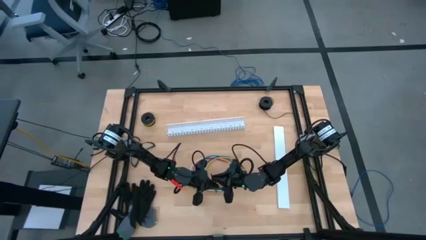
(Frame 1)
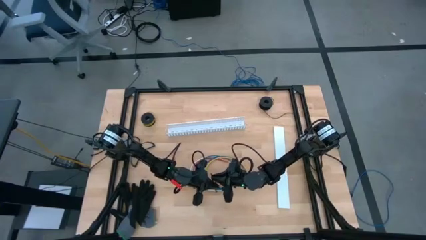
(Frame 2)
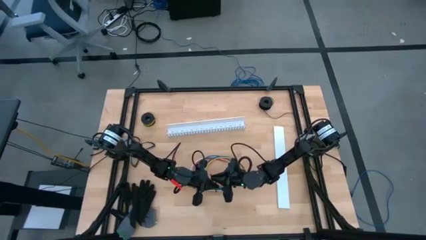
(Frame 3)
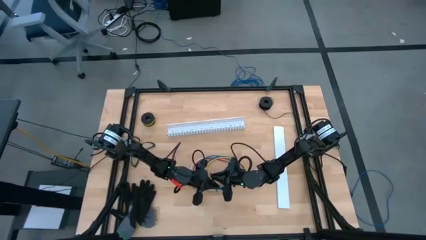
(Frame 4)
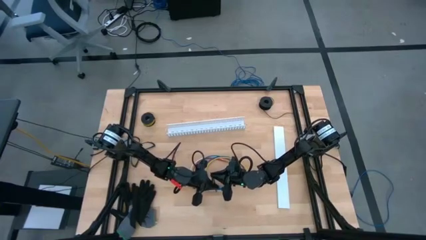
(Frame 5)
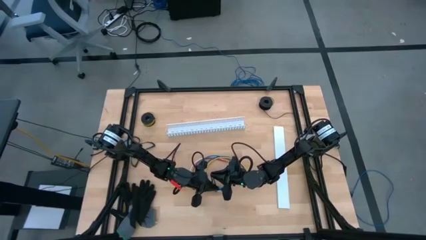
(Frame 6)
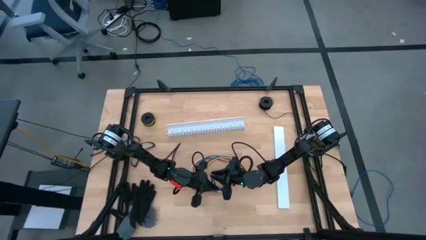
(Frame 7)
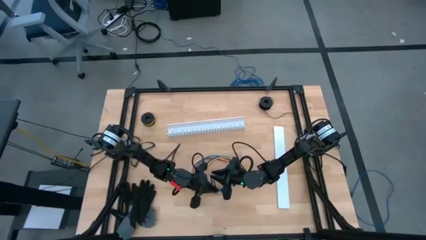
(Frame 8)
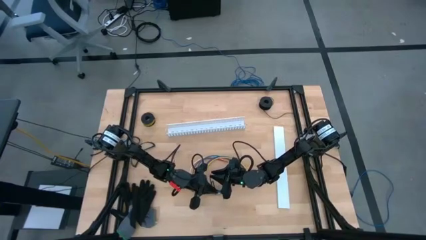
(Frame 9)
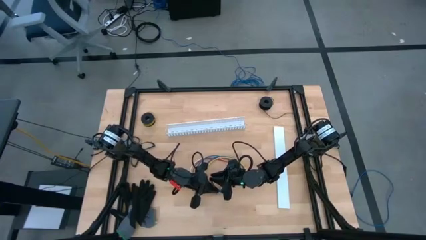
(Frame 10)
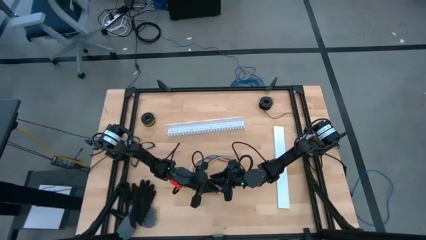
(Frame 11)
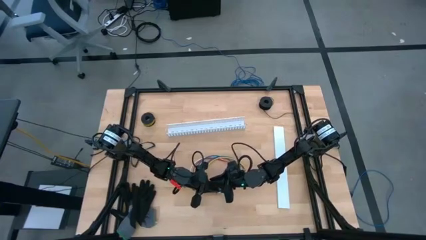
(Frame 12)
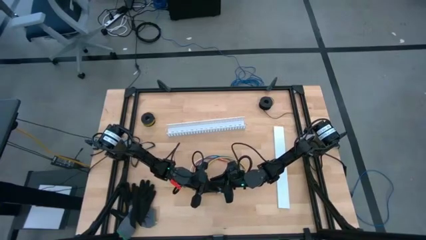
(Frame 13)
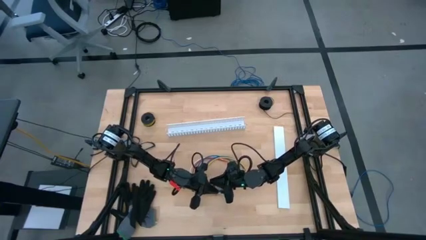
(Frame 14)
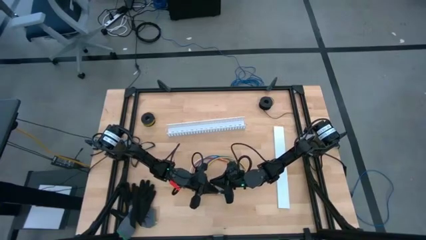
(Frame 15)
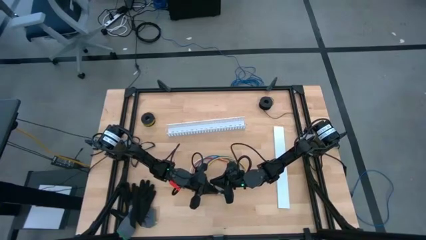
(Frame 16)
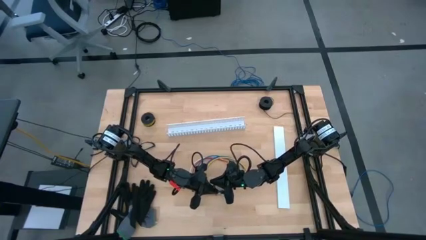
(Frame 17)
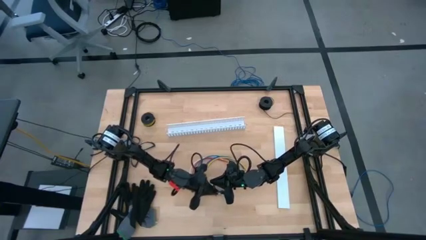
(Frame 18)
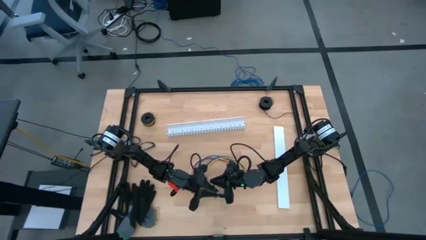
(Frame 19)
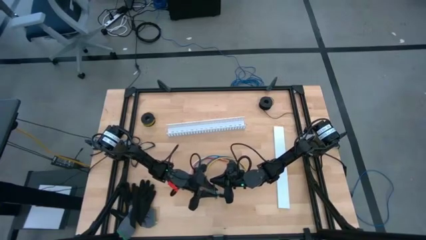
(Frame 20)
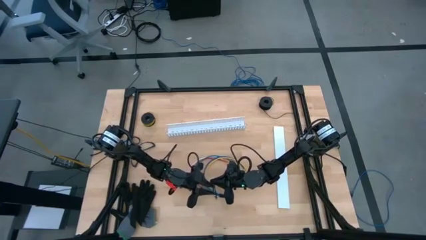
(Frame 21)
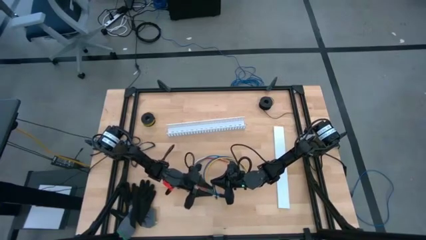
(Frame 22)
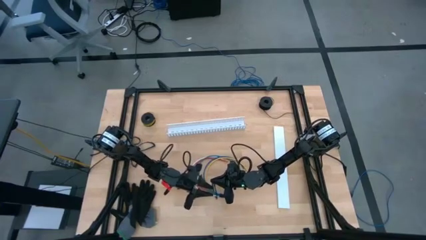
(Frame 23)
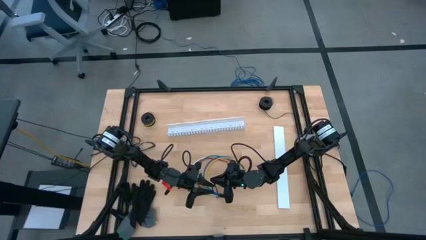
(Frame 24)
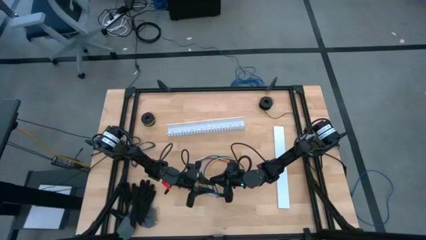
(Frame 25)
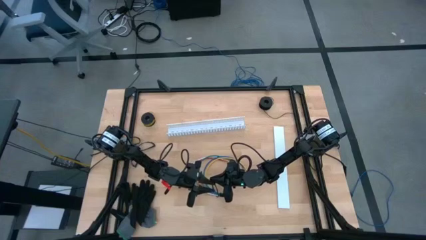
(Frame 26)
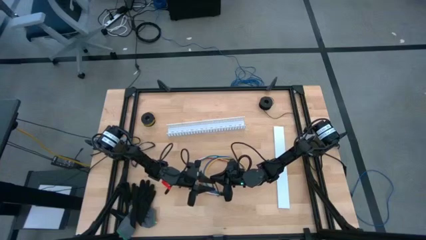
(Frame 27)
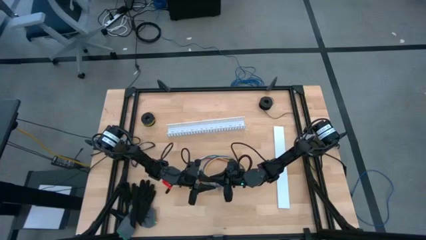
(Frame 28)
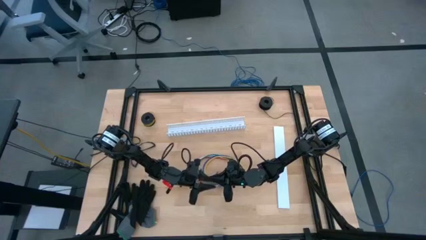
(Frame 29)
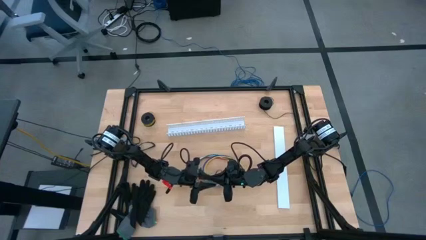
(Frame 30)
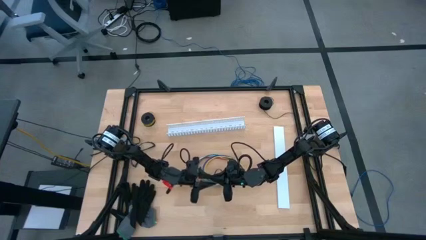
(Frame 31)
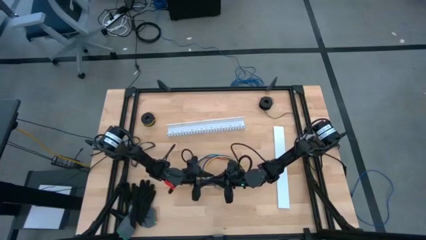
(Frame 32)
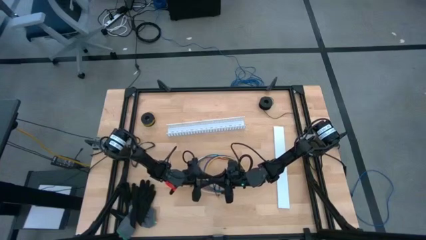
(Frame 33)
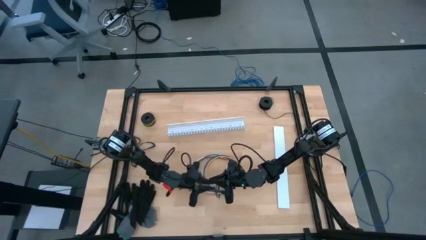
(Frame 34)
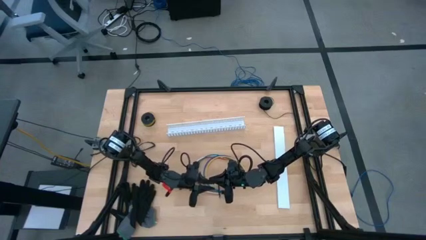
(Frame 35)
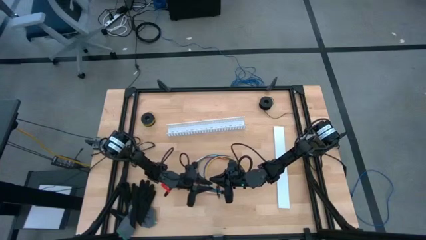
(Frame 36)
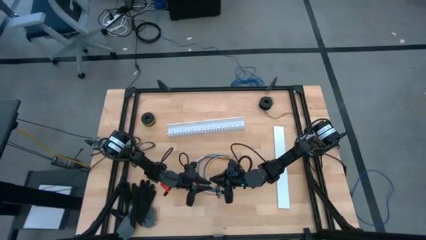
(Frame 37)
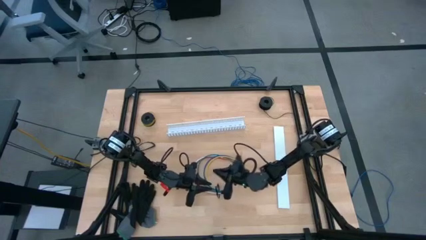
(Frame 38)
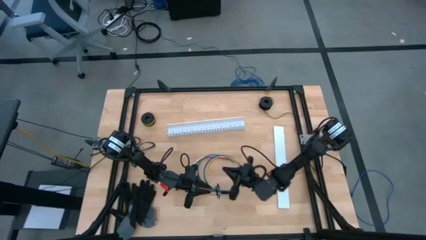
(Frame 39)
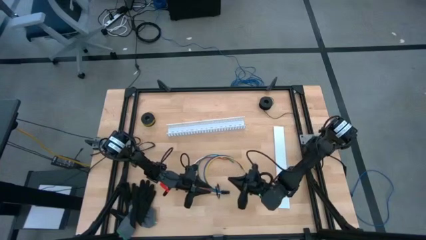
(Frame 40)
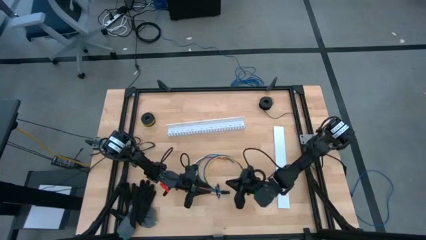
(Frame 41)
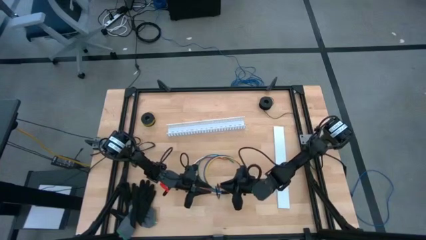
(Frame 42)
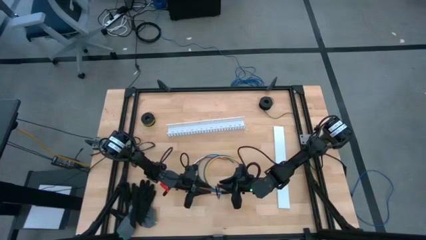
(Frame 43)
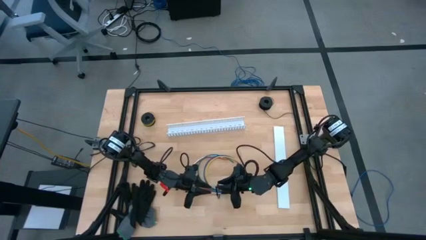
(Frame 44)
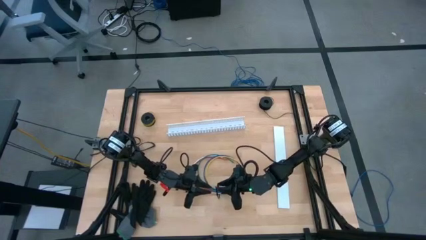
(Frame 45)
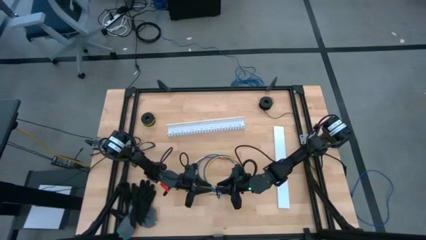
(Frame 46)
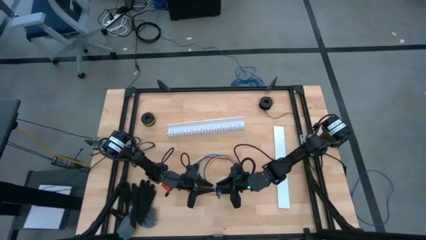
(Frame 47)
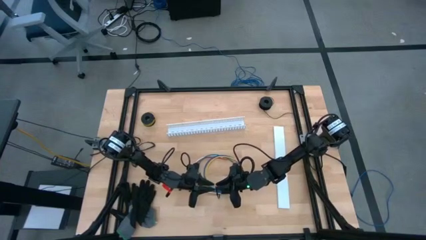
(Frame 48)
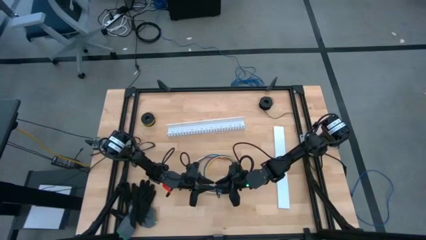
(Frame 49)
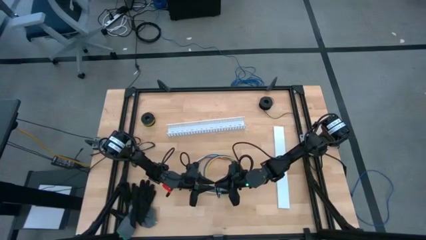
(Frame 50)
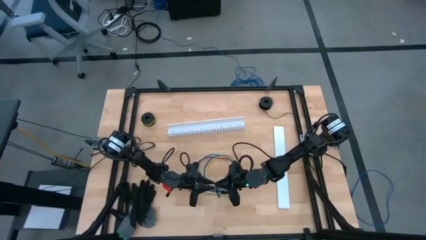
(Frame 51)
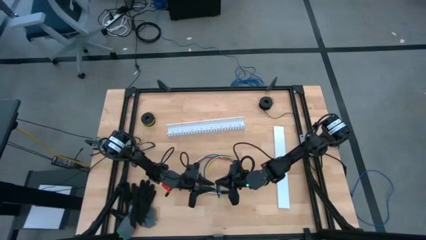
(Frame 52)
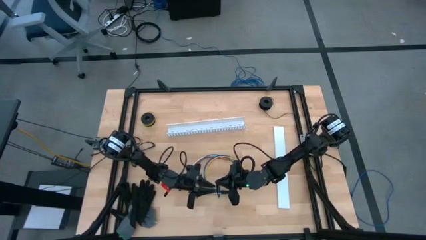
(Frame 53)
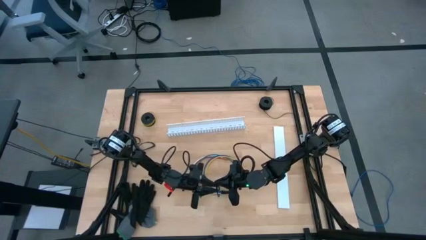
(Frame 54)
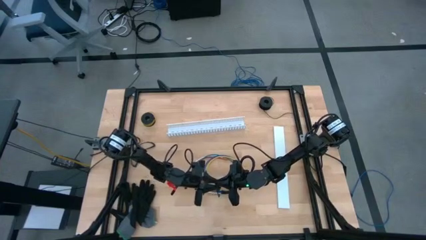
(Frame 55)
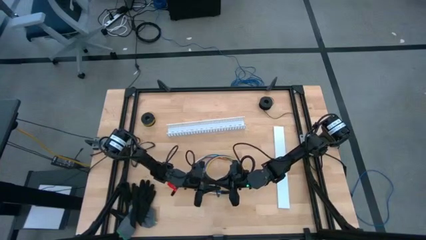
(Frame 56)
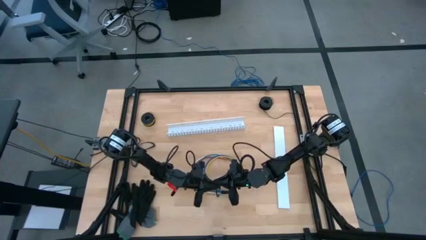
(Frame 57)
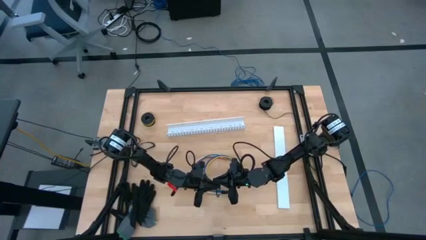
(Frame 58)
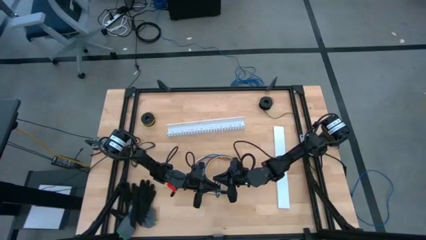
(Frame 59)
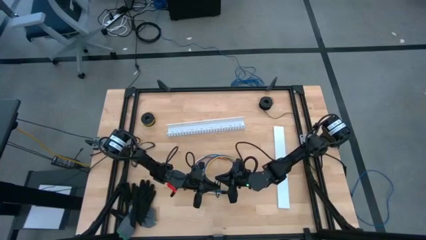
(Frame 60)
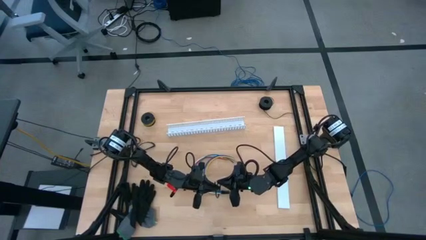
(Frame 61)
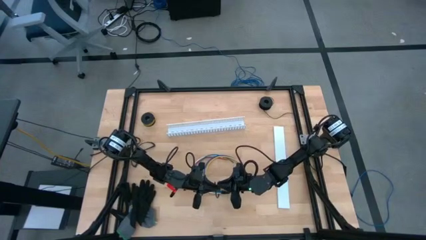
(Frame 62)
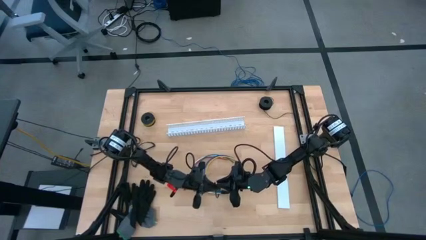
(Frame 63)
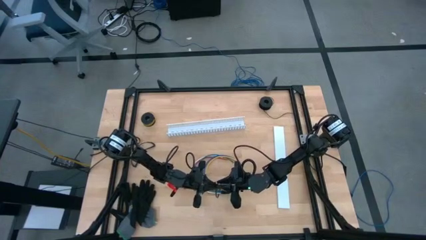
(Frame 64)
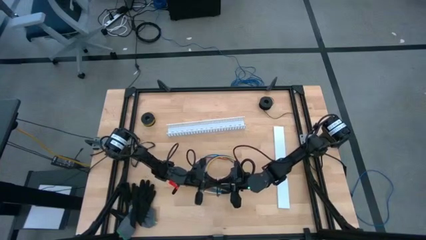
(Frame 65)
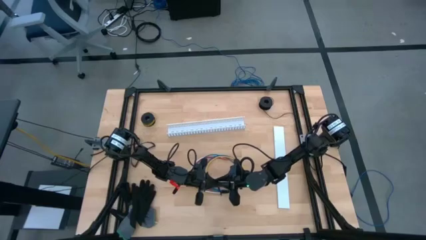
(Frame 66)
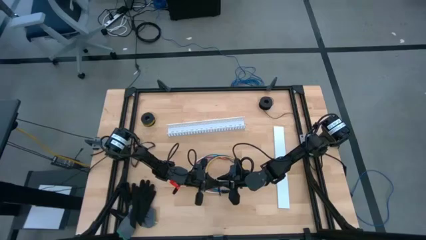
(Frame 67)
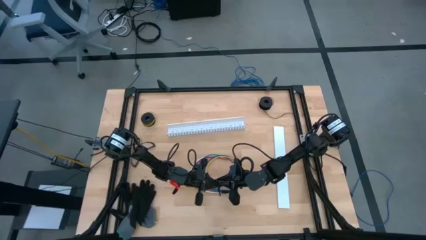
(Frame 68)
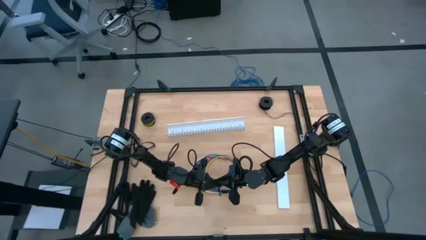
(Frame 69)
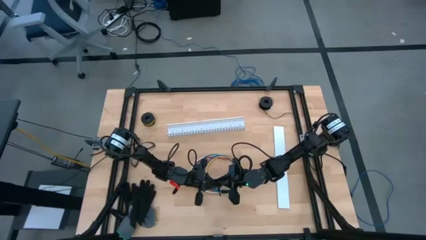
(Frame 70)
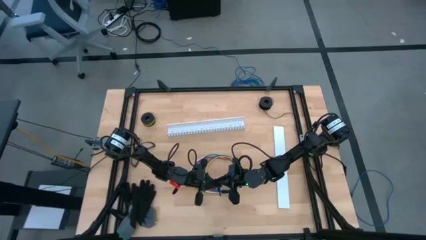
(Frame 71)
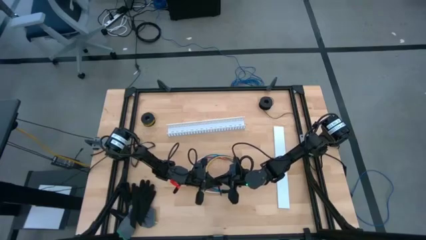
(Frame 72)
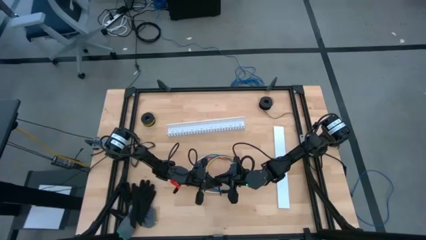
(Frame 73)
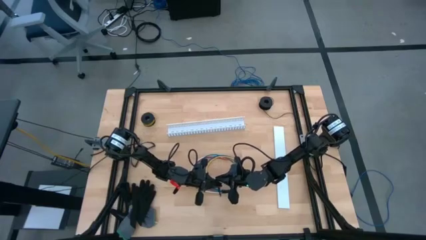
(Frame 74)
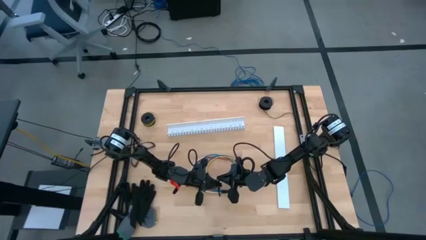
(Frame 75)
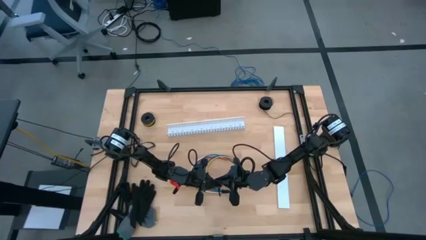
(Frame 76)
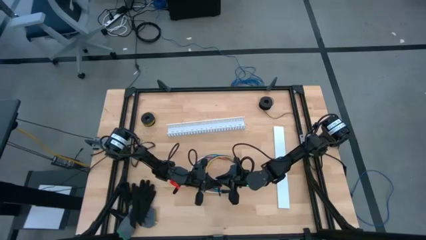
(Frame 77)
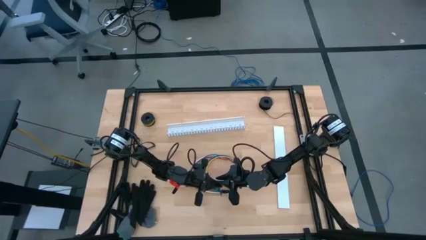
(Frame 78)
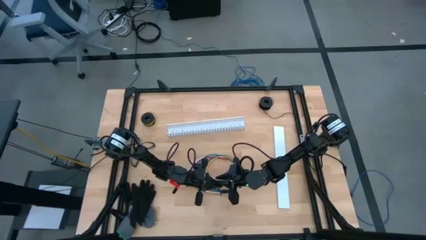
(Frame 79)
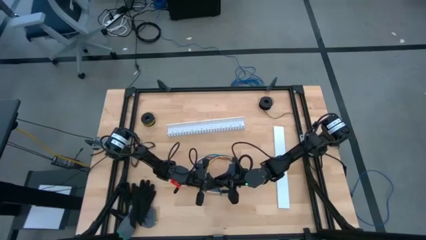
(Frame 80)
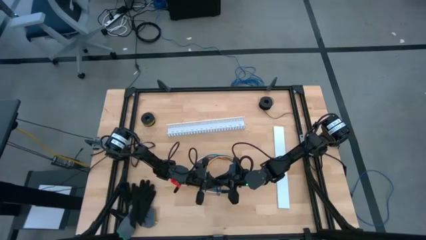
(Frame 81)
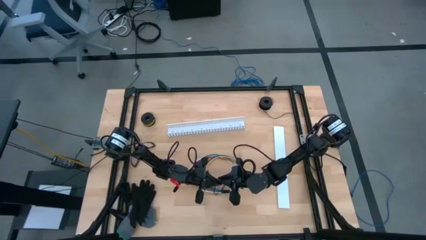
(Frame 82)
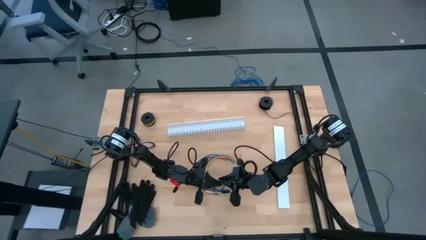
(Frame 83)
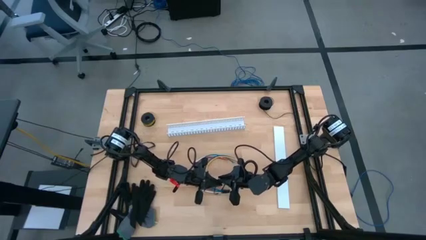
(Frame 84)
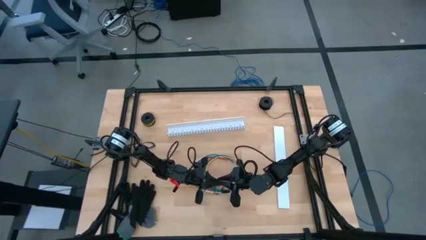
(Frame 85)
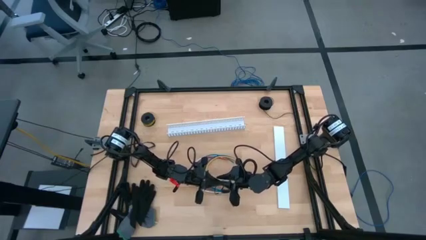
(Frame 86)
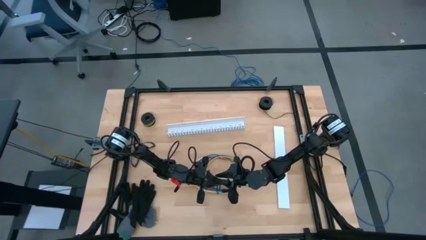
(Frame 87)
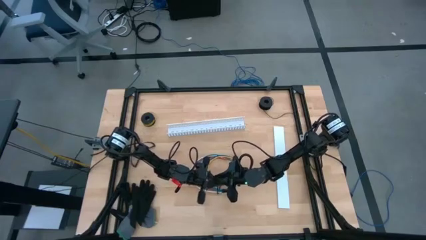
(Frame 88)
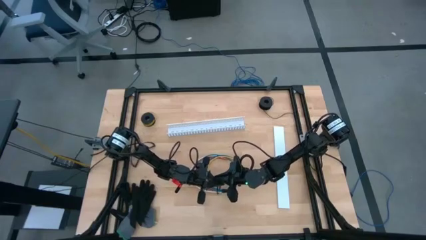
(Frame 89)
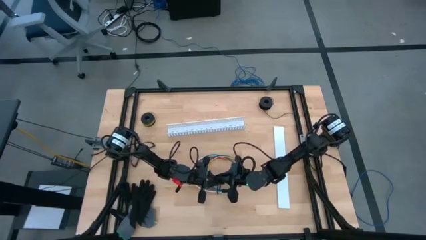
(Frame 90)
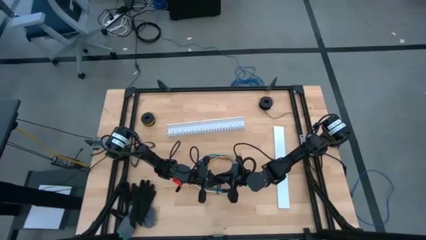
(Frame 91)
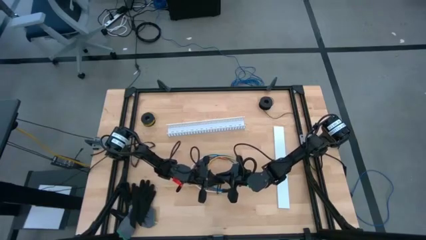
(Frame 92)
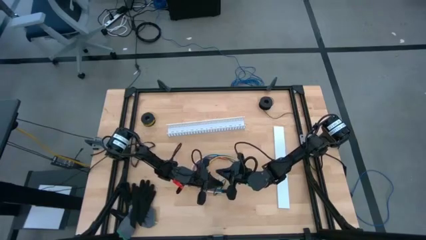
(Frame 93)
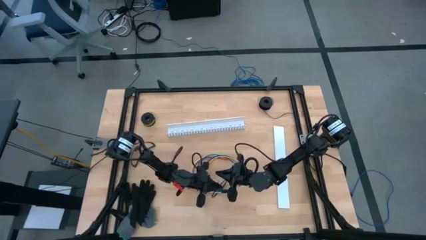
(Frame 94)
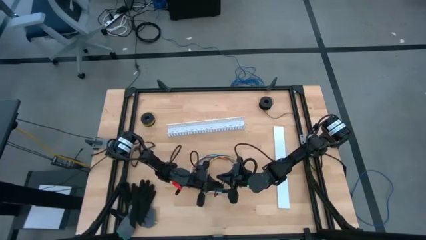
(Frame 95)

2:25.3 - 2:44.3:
Task: Ziptie cables
Insert zip tie on the cable wire
